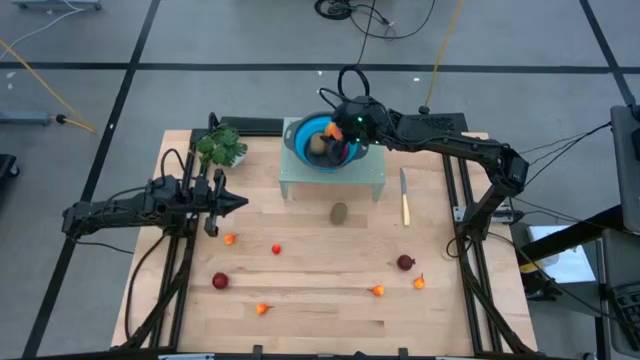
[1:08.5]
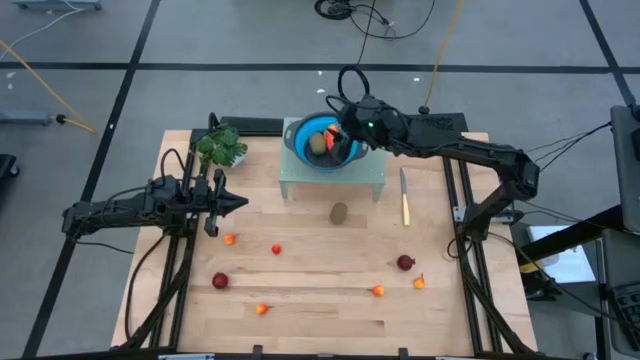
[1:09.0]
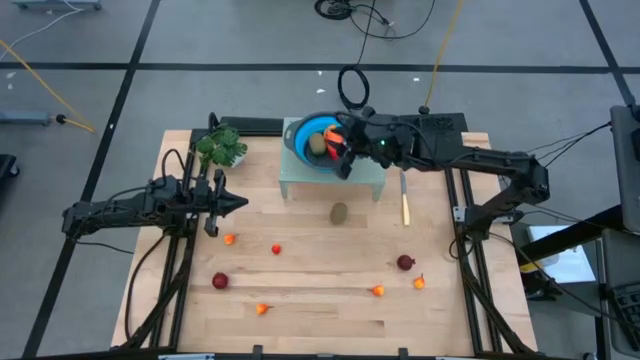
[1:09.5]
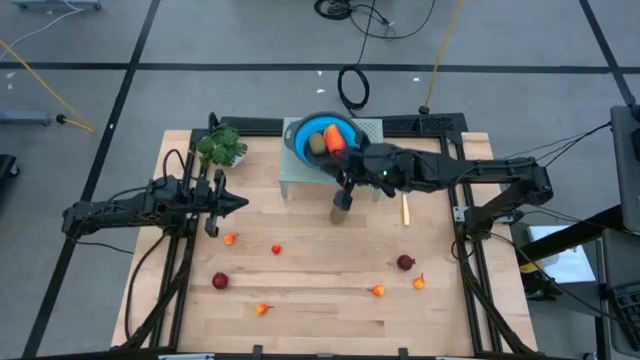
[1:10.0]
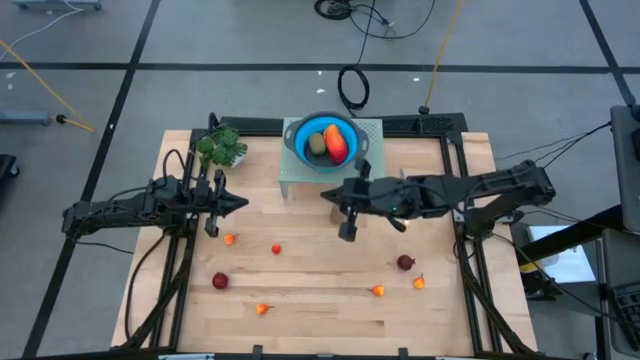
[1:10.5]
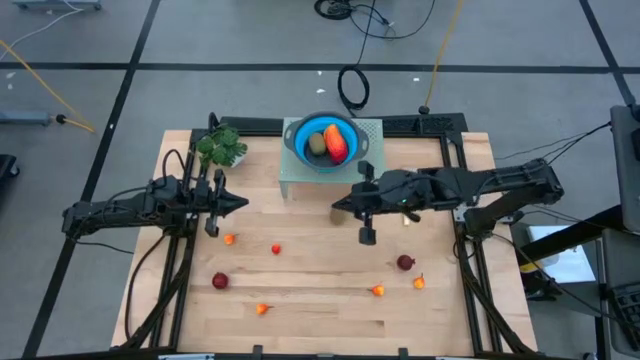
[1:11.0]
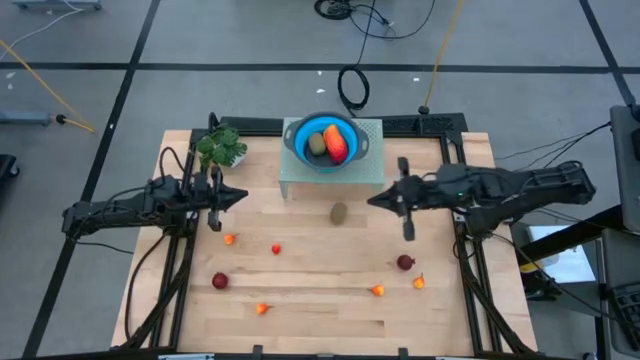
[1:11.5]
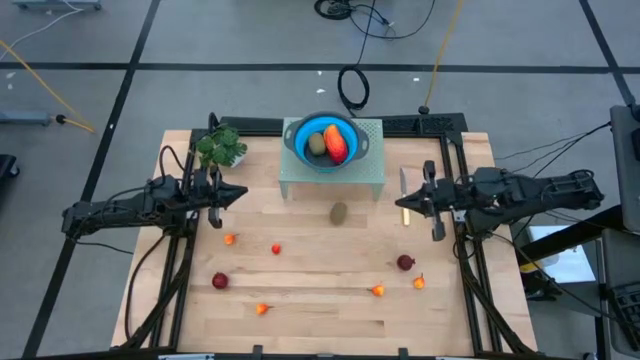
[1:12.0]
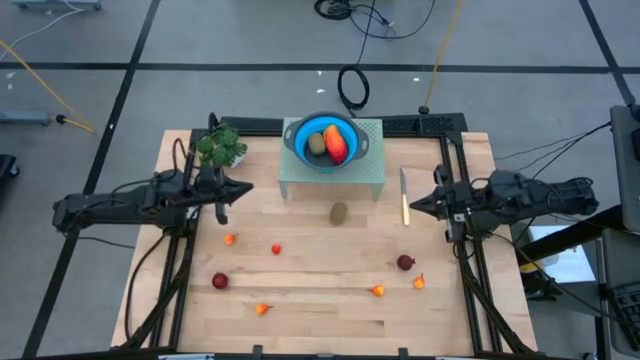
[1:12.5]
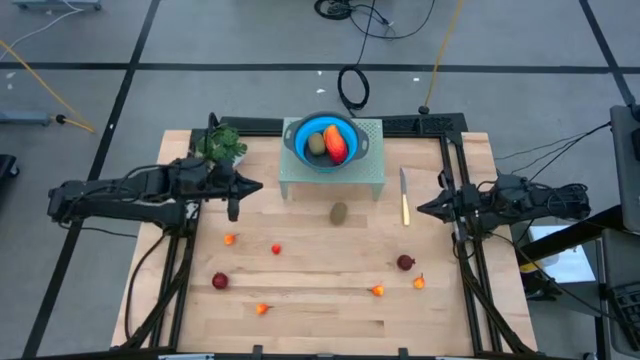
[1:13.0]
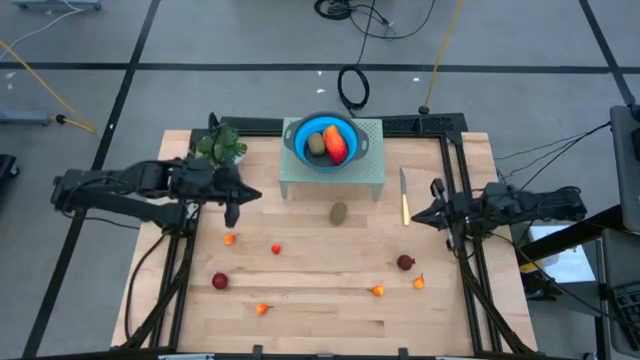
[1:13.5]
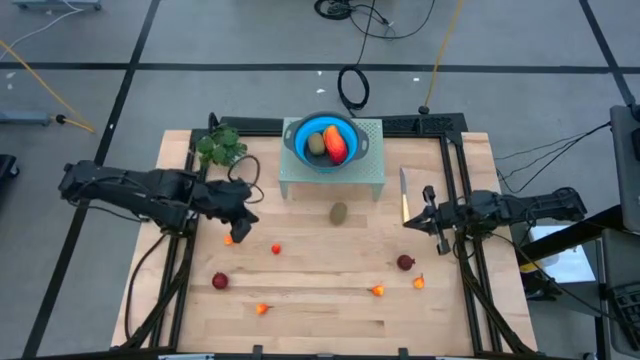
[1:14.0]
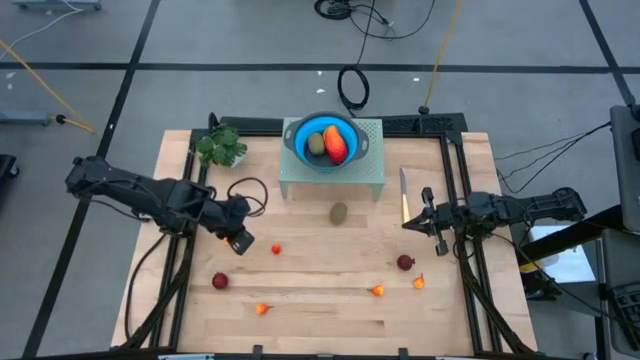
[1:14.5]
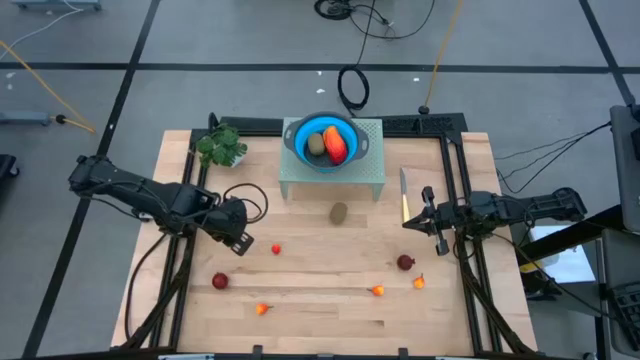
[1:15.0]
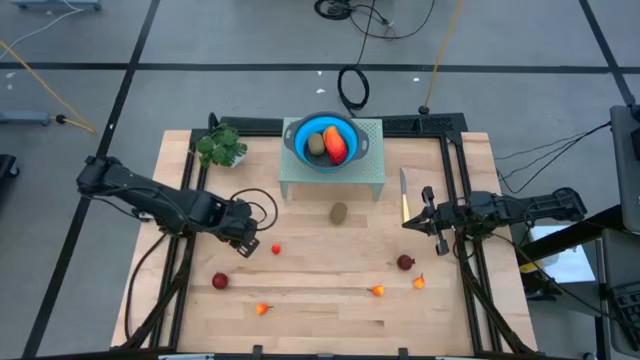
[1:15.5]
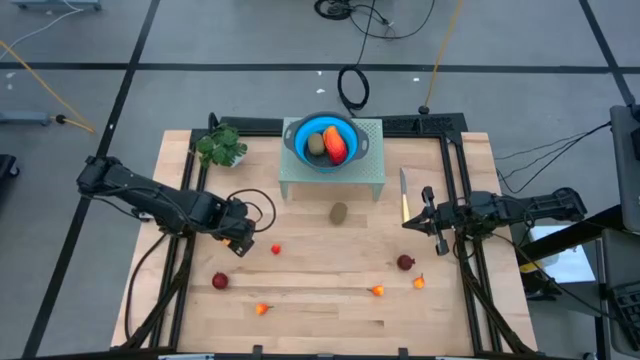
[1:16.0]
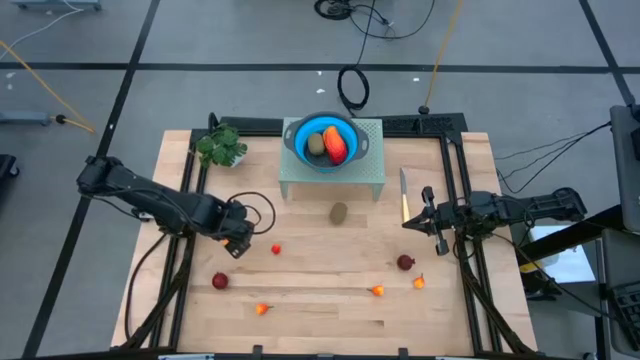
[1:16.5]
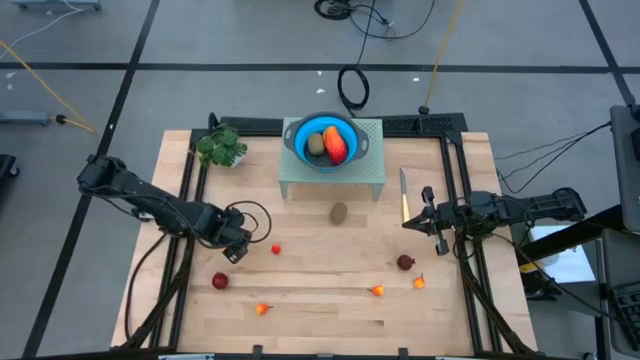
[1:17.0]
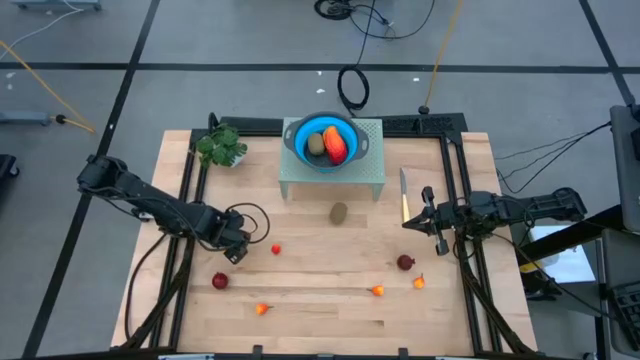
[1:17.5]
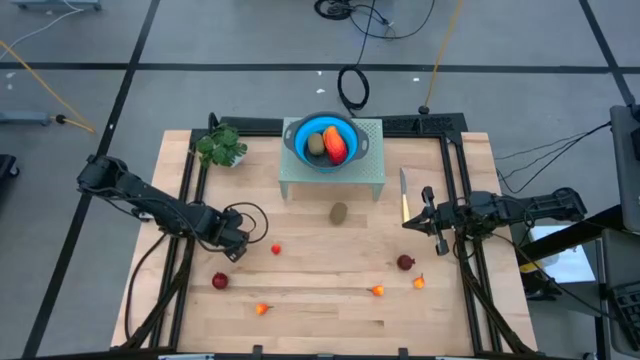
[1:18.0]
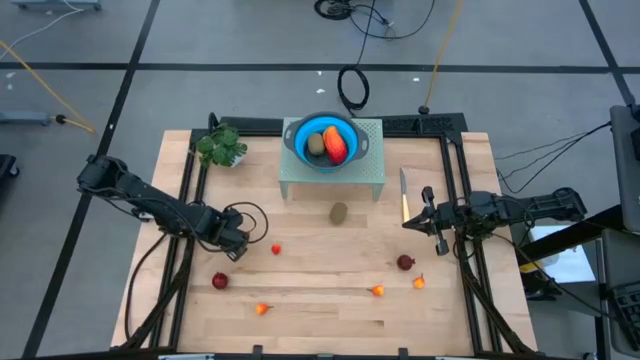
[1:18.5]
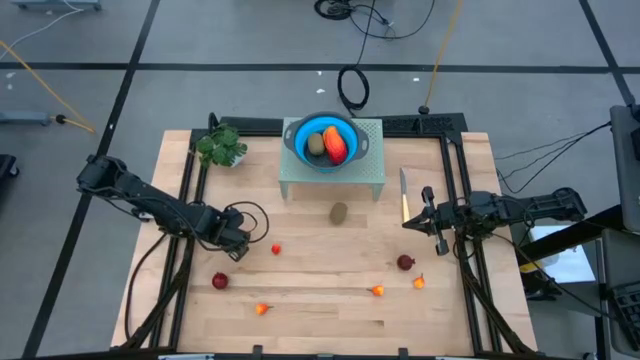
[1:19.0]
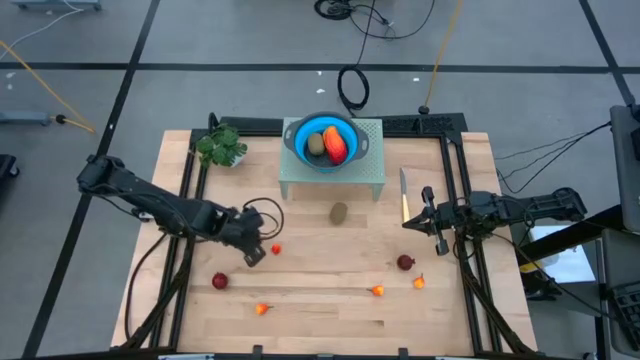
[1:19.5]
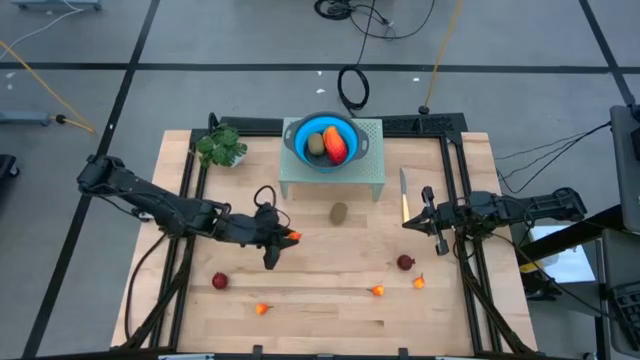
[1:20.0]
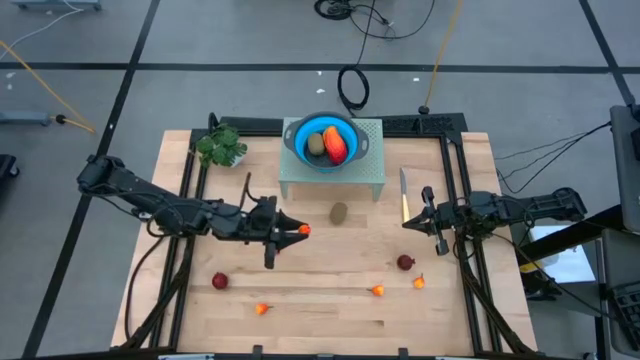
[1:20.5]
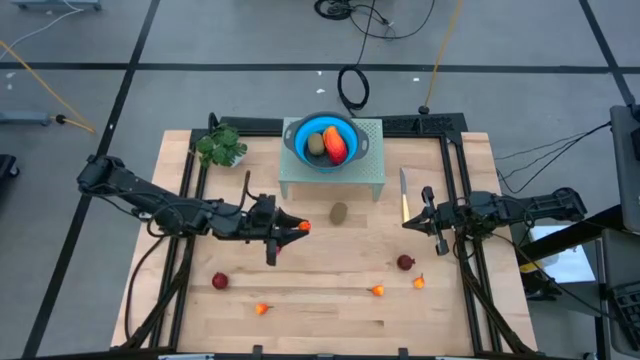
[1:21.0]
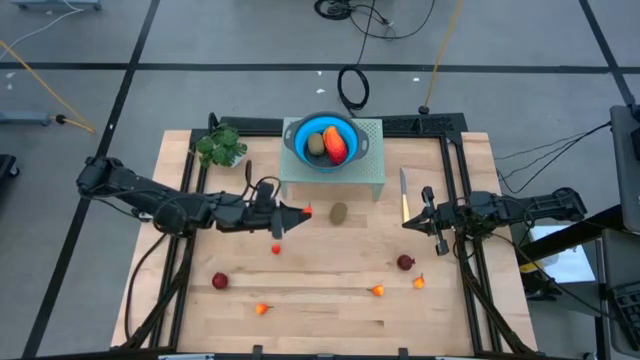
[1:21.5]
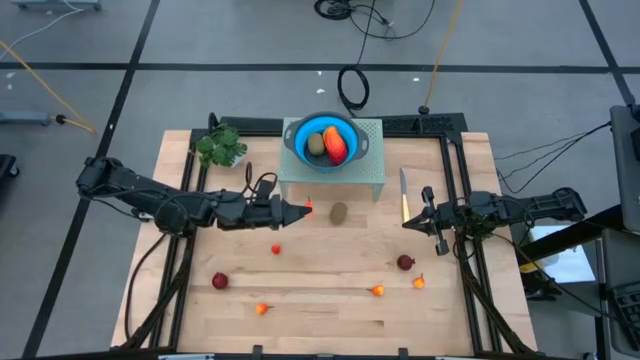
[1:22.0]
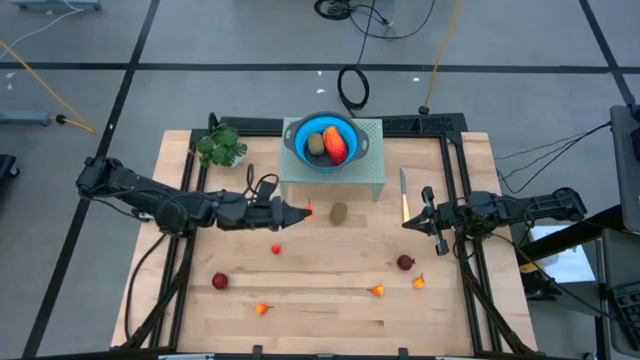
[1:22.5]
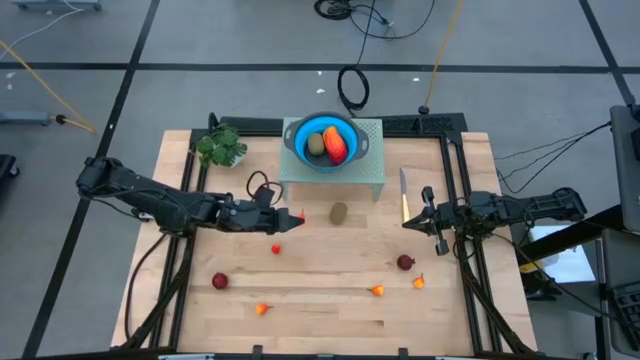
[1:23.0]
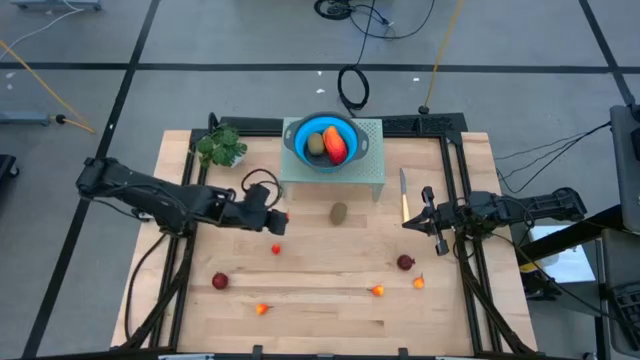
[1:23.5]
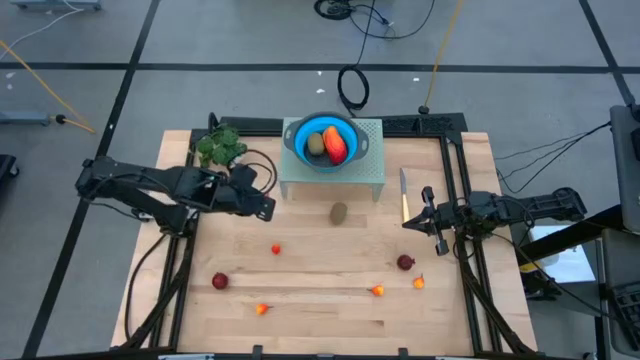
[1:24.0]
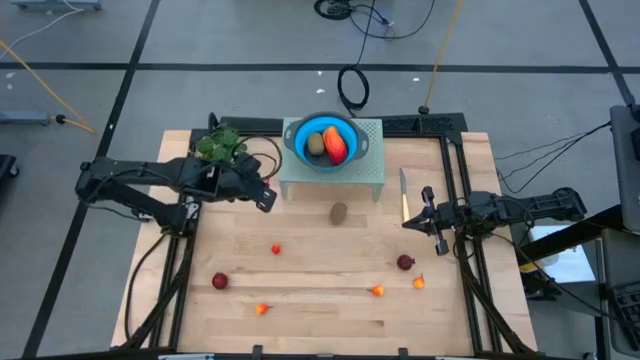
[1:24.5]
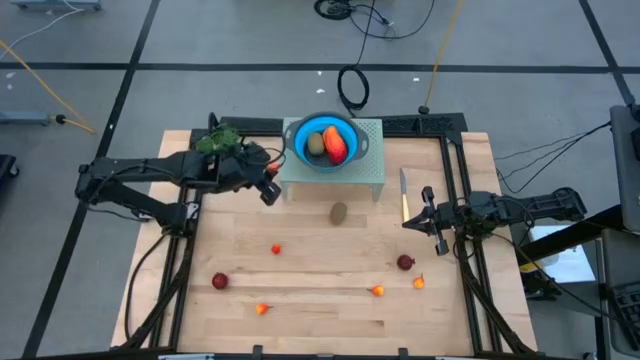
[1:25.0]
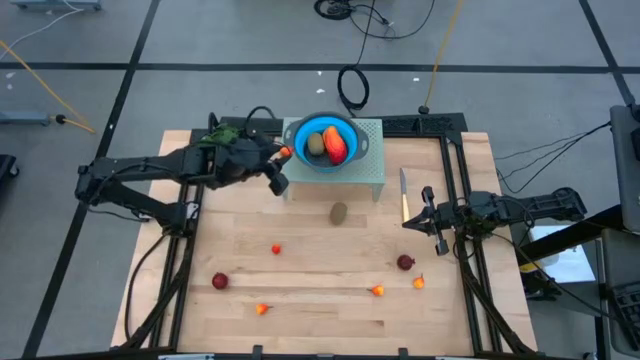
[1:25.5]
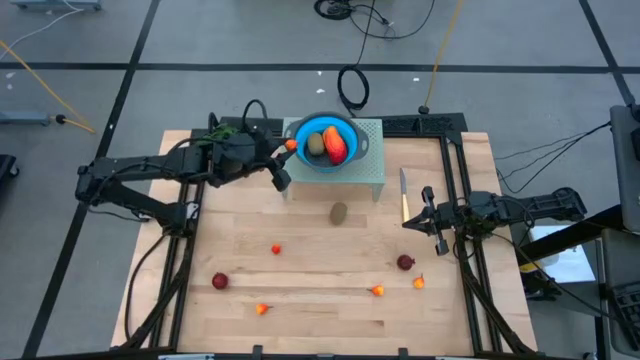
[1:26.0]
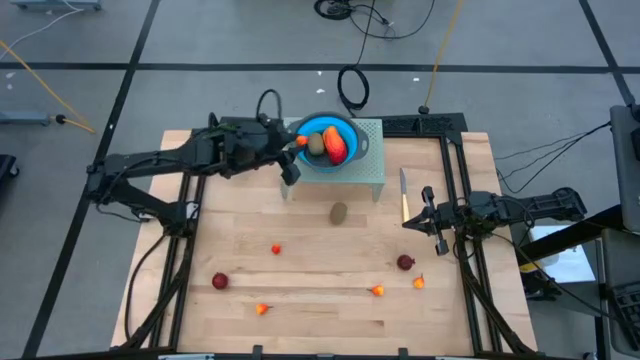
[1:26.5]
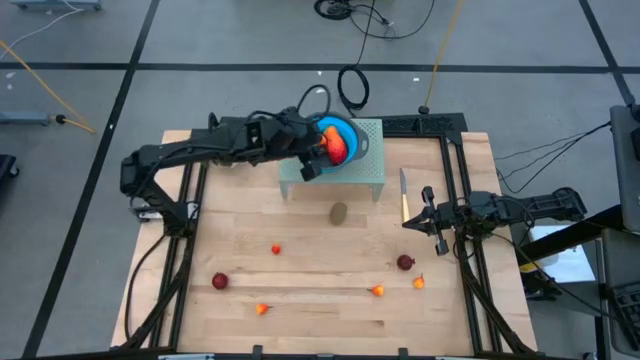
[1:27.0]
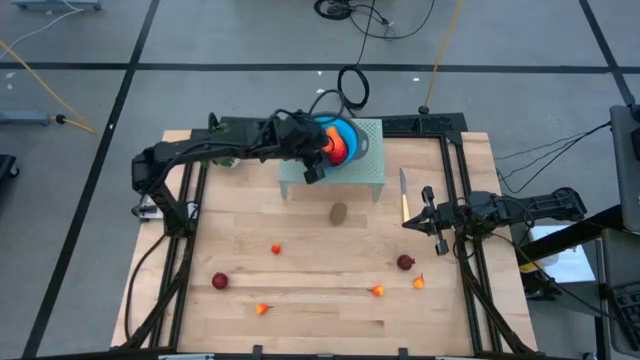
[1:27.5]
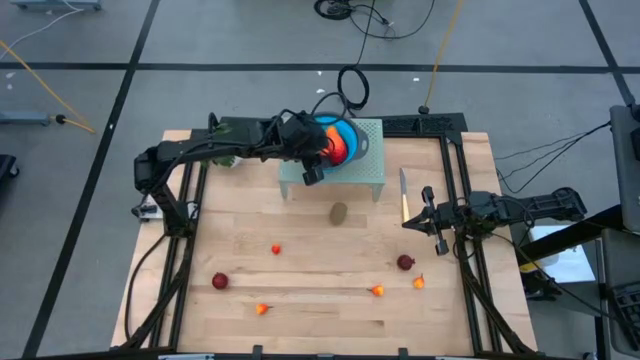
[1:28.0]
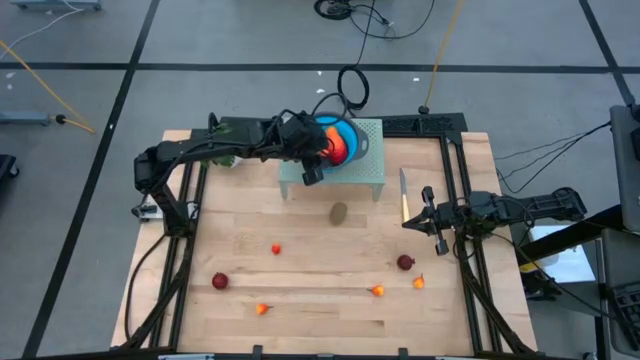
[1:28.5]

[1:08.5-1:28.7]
Task: Pick & Place Fruit
Put the peach into the colander on the shelf
